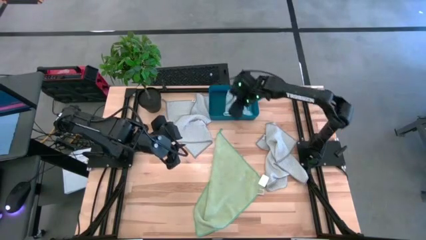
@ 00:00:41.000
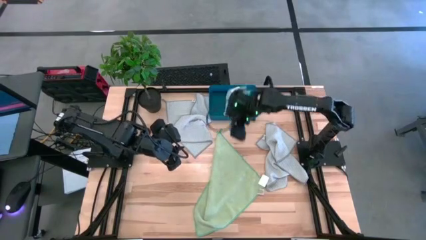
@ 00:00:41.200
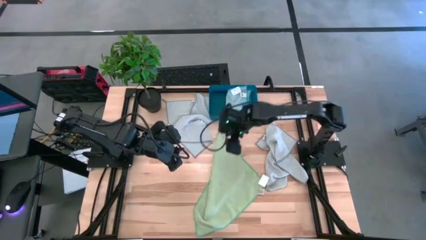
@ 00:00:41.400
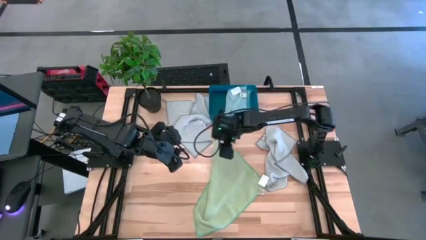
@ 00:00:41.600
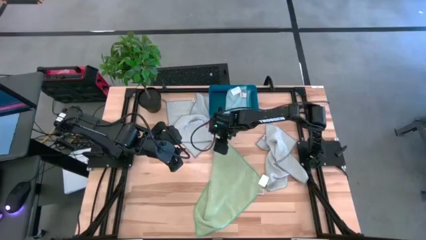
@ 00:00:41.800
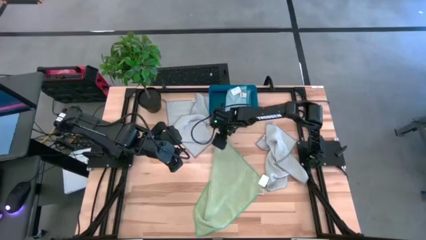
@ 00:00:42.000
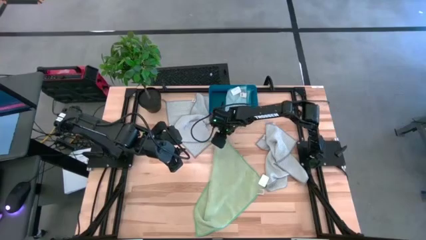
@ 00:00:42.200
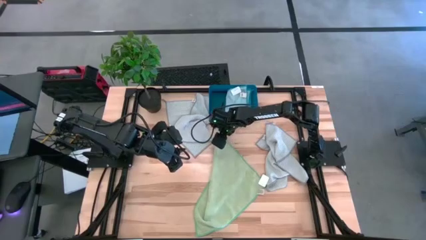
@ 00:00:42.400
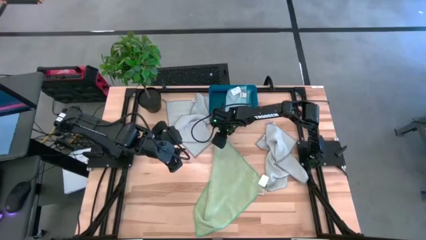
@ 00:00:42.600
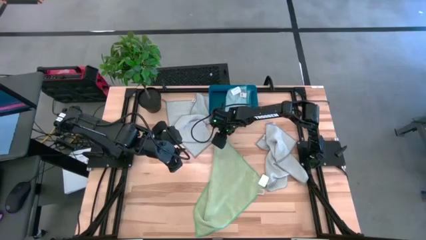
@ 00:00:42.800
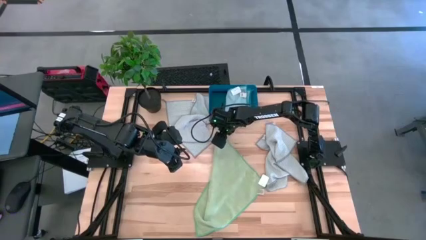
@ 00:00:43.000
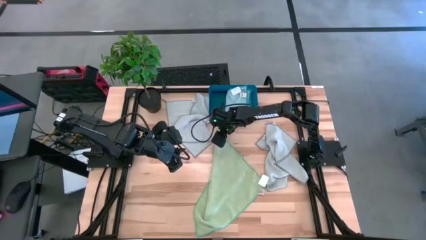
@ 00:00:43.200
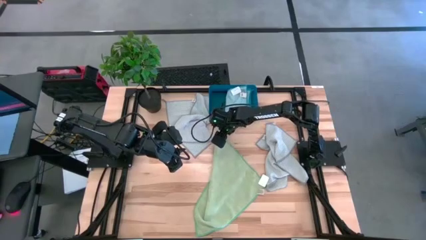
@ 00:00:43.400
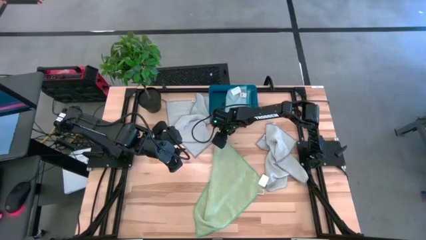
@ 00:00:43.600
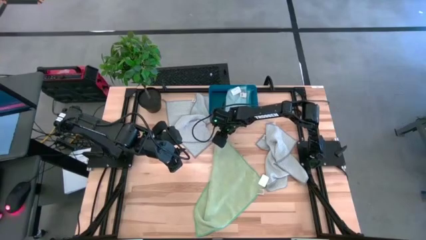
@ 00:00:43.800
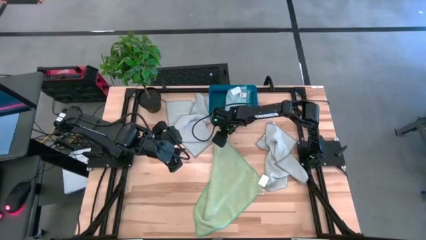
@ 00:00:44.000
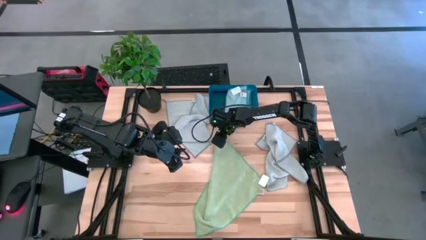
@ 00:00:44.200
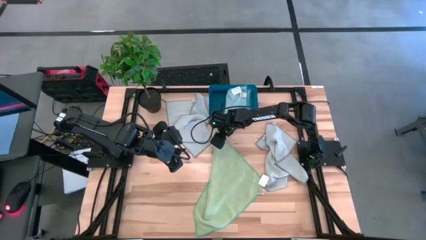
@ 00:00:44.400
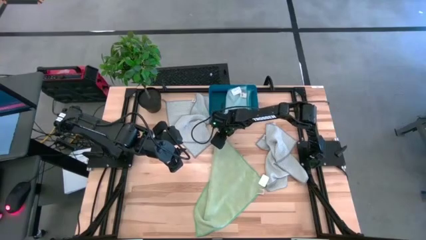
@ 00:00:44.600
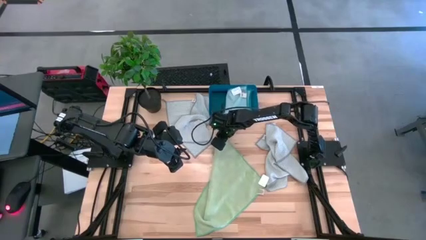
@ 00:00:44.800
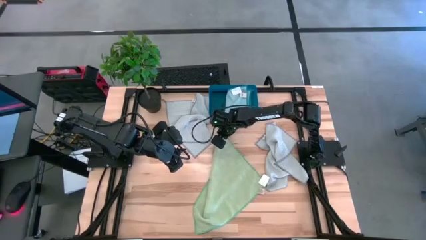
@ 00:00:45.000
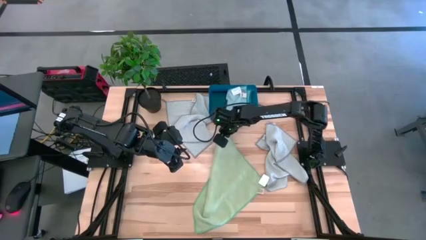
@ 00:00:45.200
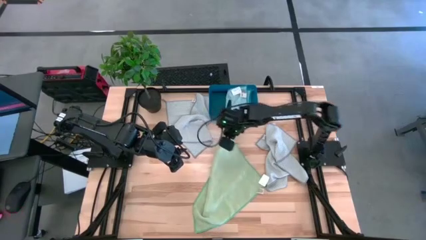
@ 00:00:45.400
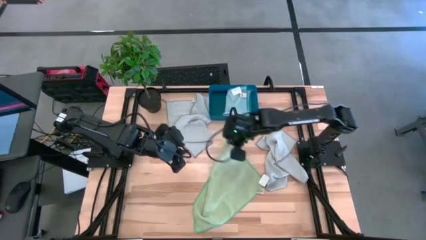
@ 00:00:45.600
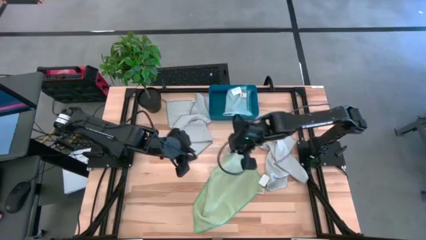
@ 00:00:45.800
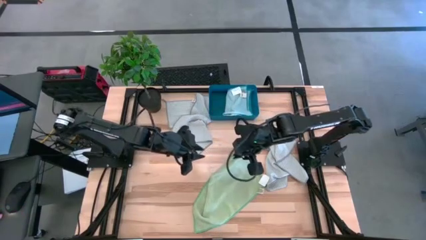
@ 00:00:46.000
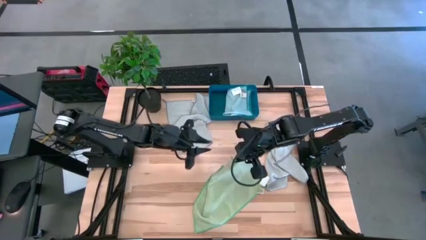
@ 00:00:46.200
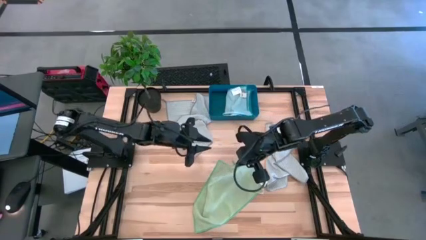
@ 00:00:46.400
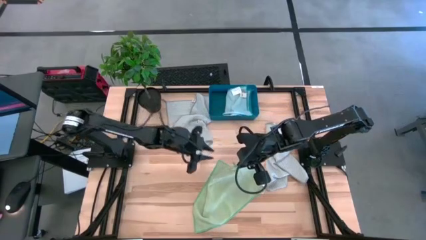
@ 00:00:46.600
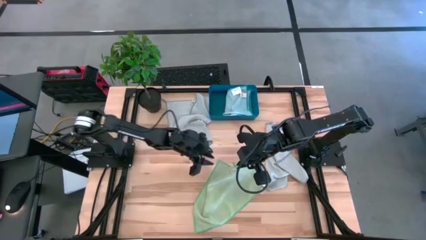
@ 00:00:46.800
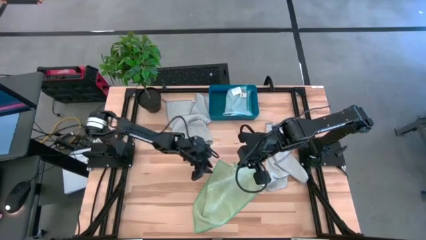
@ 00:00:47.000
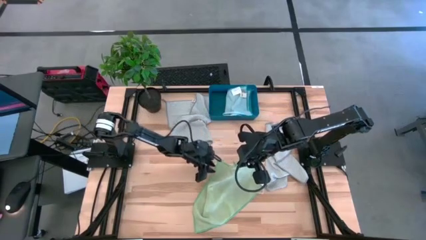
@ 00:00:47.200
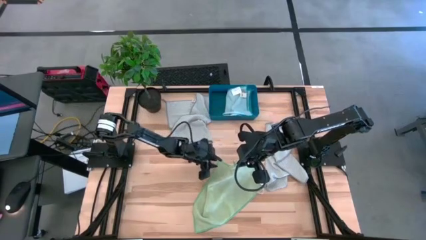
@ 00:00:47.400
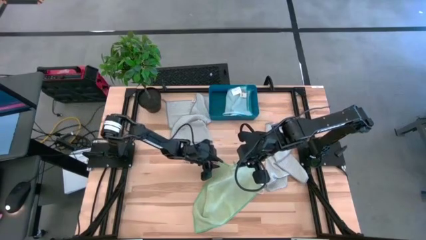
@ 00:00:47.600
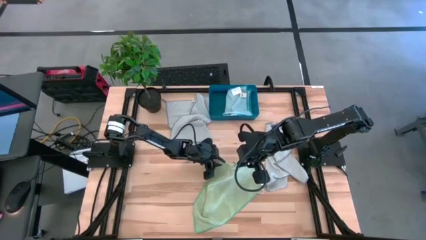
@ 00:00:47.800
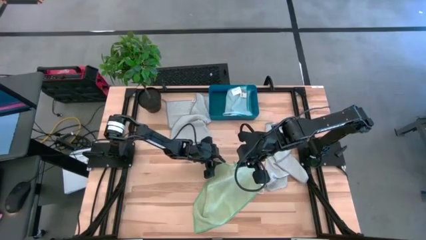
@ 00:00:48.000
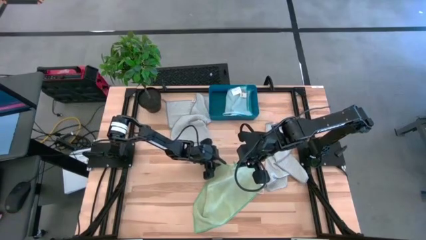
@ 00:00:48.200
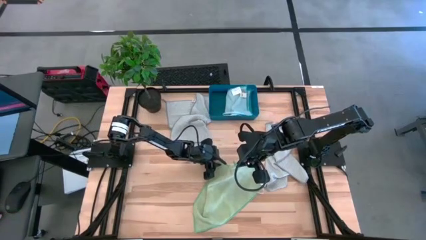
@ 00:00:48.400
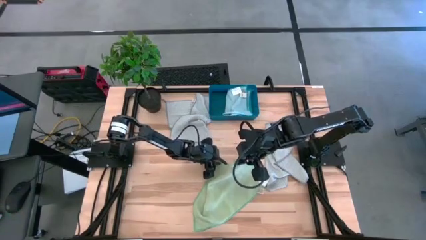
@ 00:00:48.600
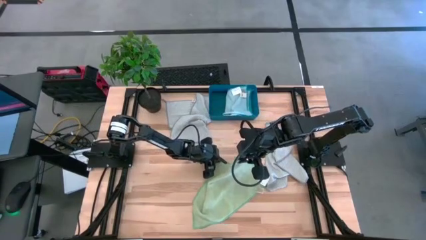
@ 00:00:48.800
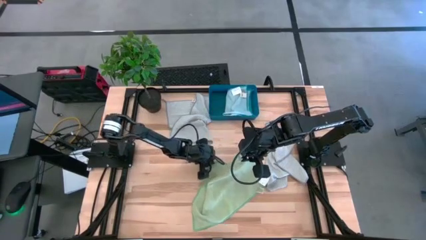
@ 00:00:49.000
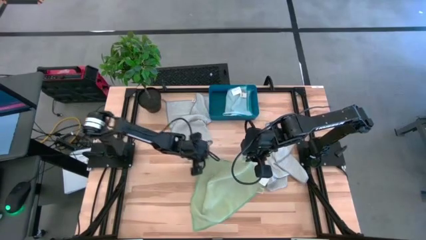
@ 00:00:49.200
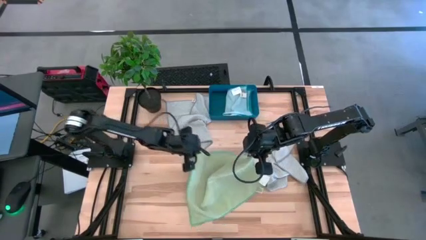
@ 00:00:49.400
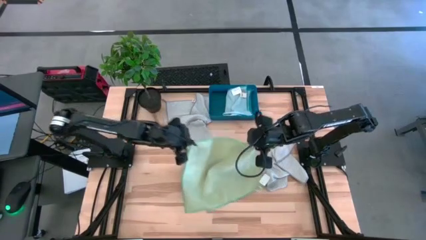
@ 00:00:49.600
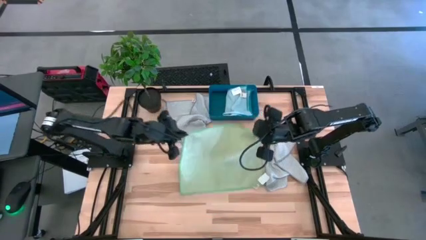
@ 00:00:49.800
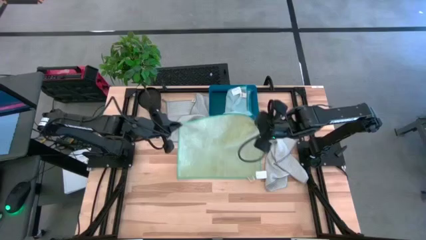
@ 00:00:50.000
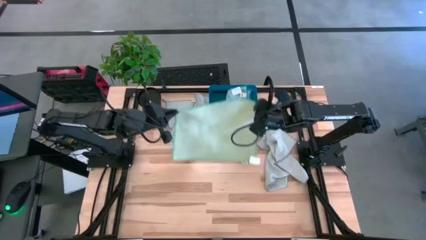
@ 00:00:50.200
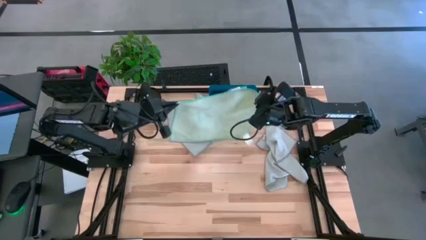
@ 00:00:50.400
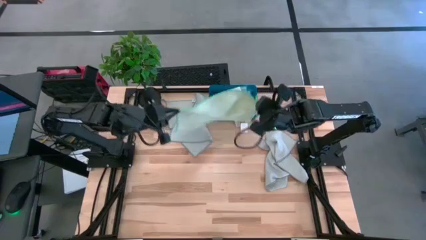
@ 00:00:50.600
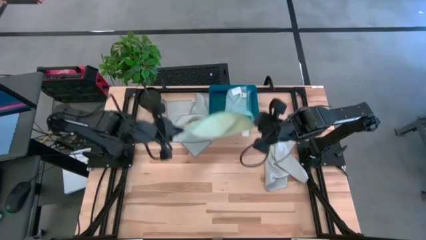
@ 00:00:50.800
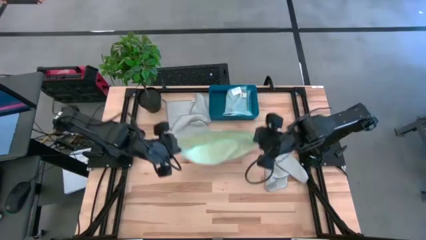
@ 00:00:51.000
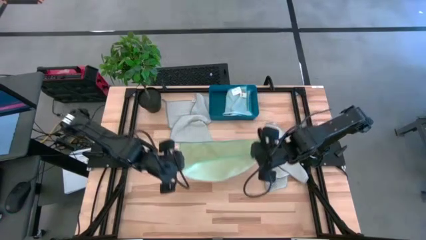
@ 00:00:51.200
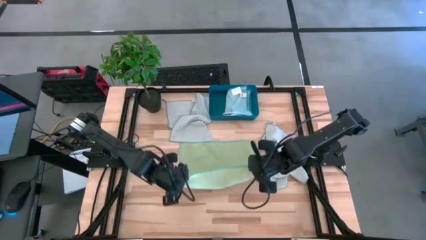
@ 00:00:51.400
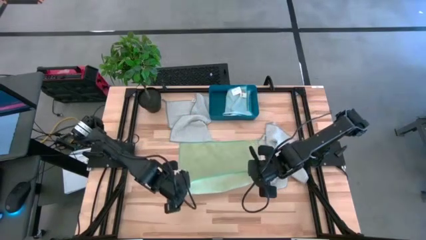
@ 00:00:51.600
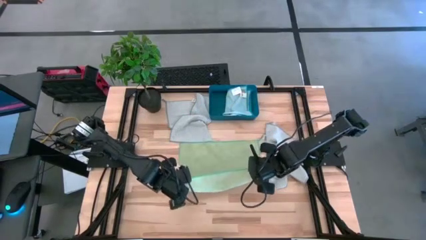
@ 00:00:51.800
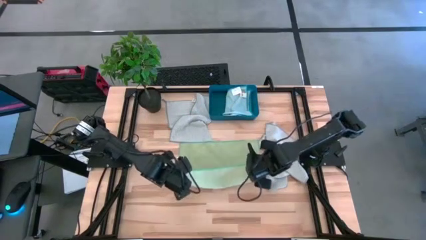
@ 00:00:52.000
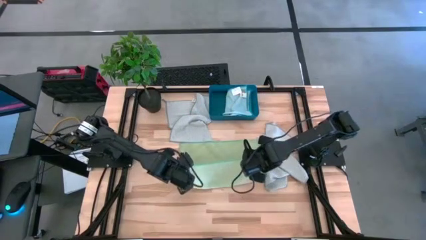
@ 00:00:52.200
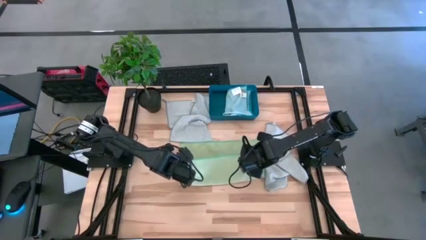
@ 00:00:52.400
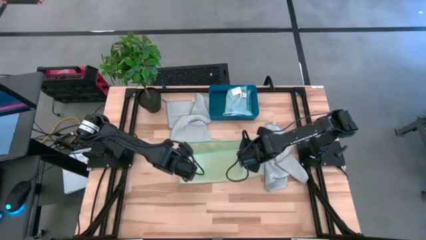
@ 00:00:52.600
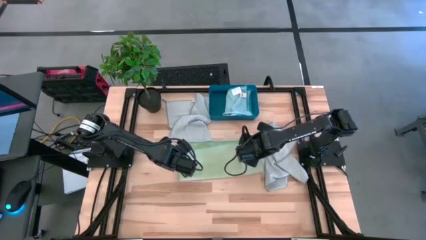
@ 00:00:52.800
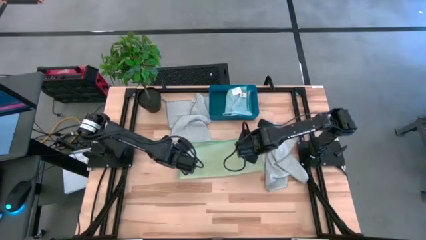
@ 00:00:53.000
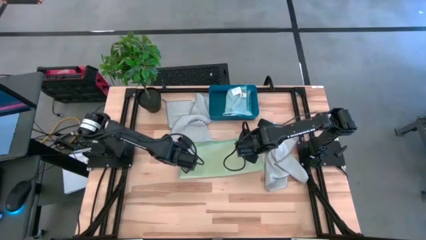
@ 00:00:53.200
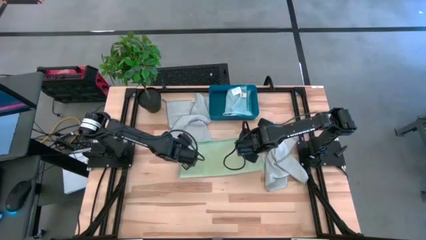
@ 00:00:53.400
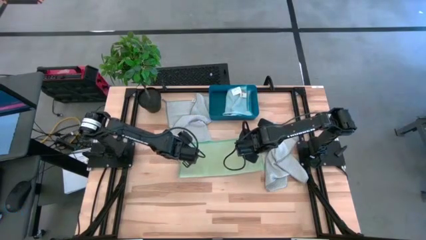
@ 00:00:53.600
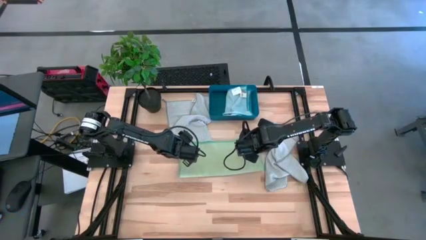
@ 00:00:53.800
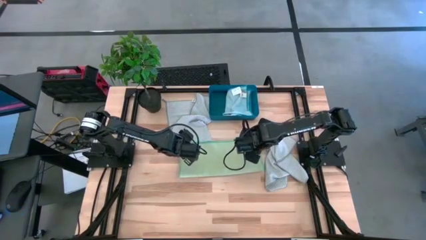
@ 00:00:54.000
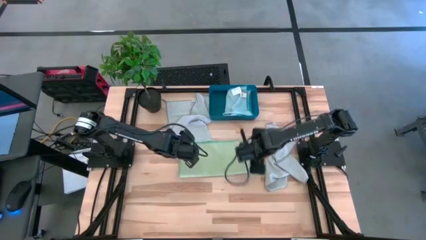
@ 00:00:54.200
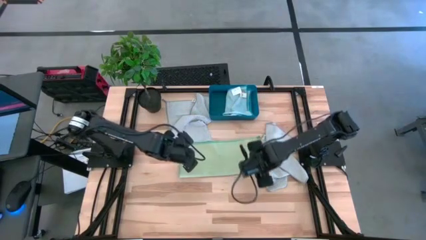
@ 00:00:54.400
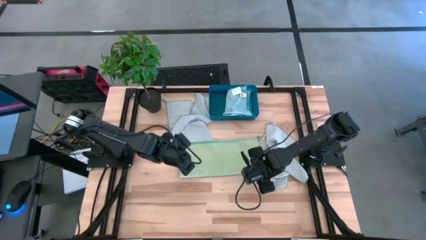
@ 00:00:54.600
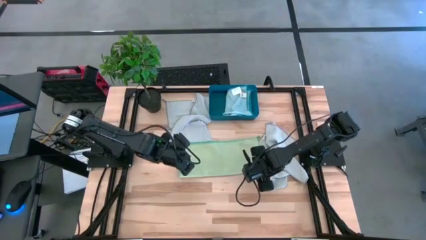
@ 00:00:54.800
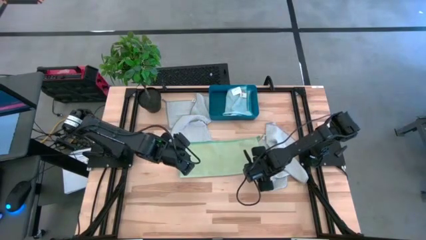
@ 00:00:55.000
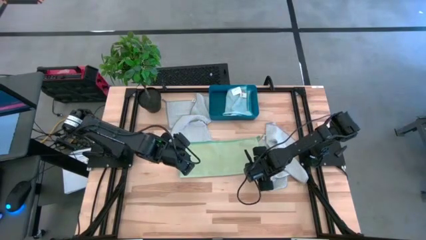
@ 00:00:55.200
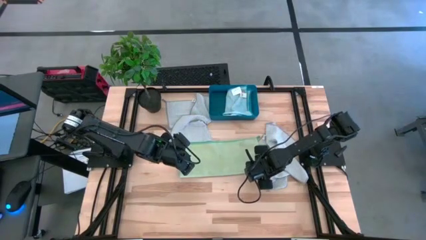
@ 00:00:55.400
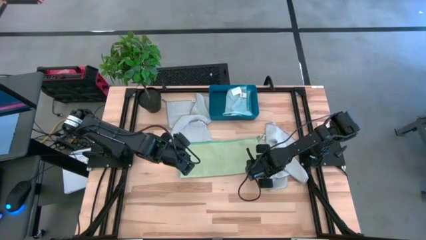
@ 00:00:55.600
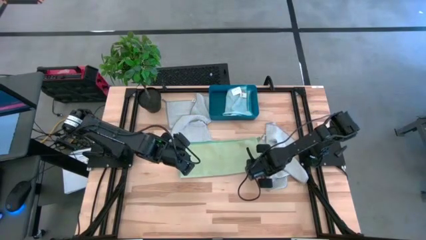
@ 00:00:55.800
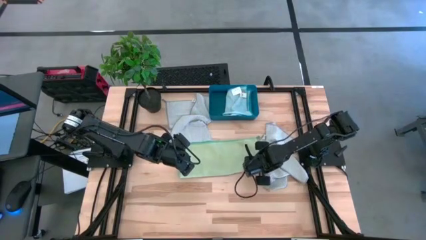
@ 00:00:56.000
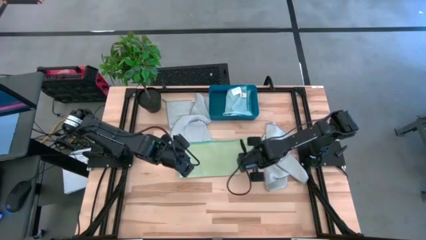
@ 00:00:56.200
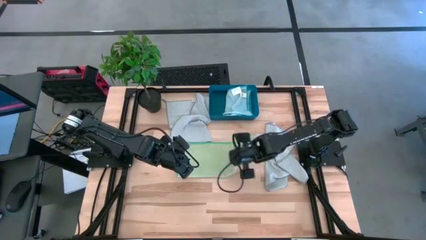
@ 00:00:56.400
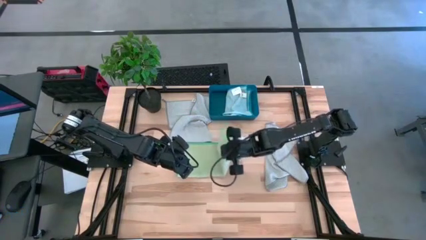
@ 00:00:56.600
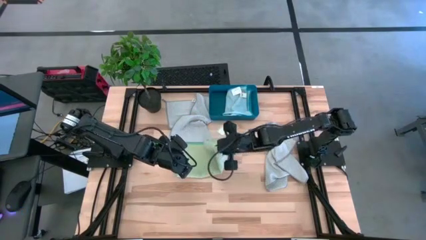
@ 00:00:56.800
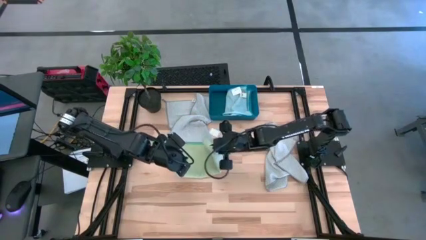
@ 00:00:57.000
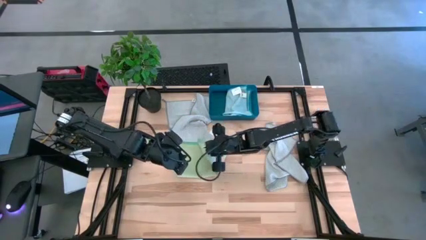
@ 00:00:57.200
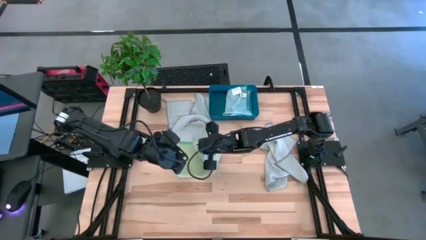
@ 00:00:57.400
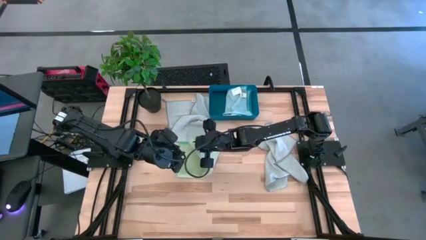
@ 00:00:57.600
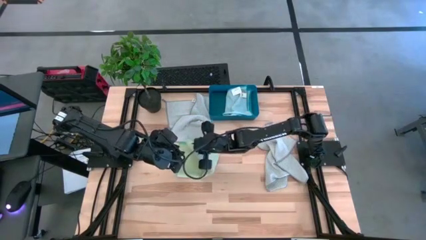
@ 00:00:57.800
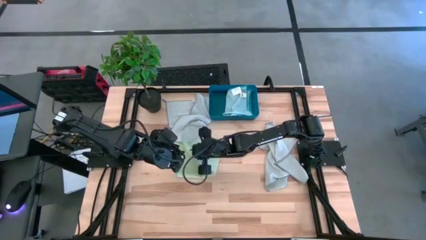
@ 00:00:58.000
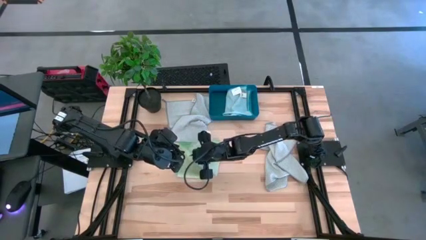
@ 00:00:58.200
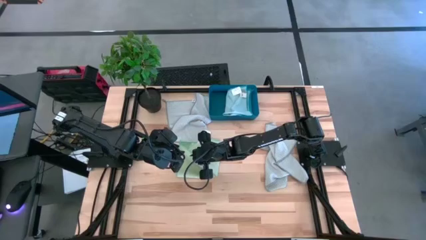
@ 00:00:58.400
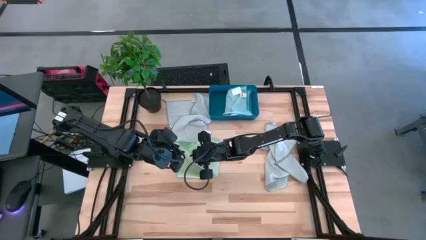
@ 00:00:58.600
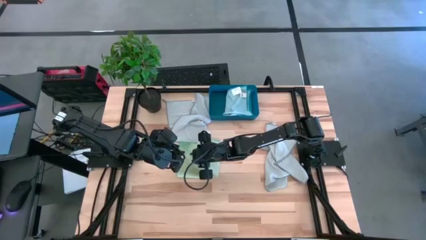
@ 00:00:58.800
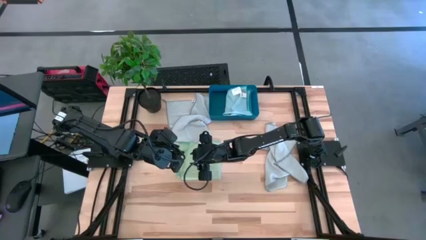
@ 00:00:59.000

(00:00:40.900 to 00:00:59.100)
Task: Fold microfiber towels
Fold the green towel
